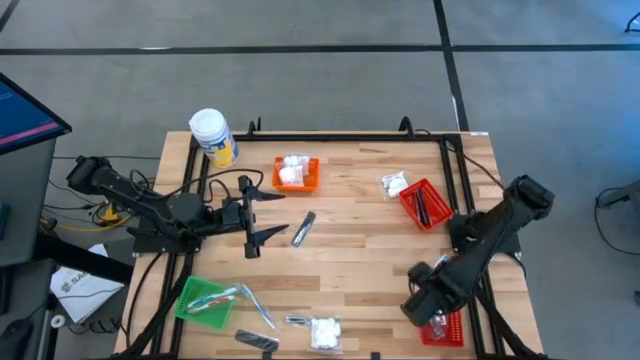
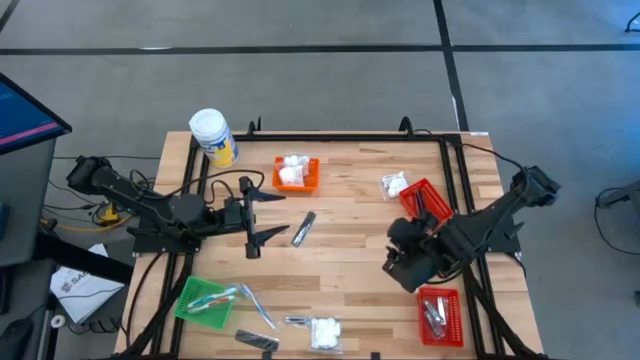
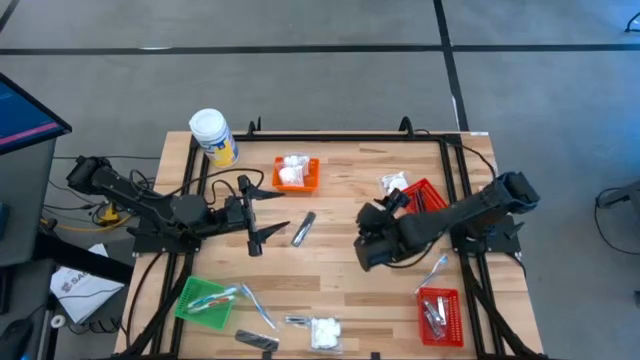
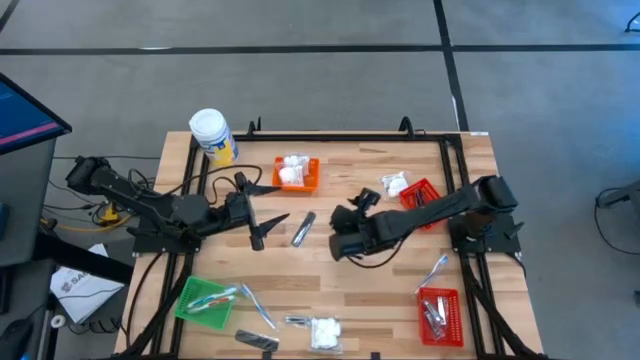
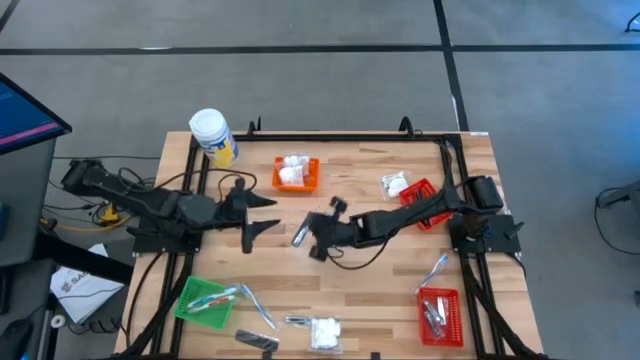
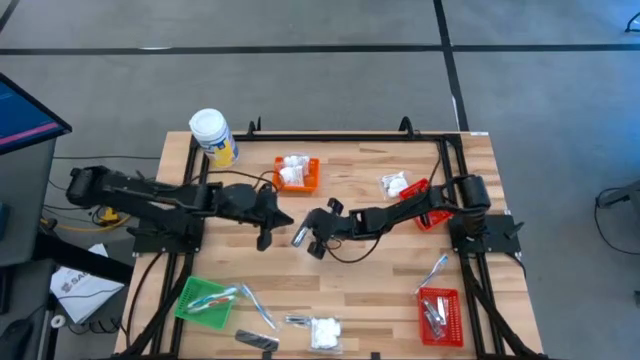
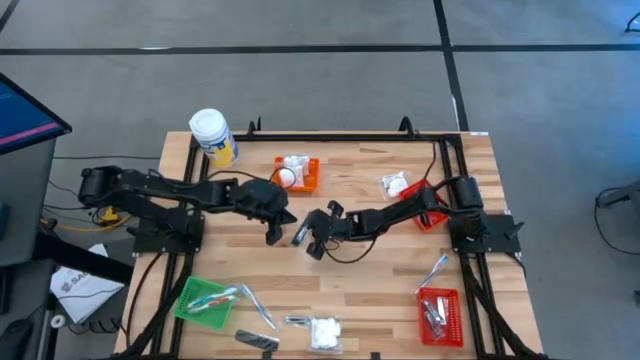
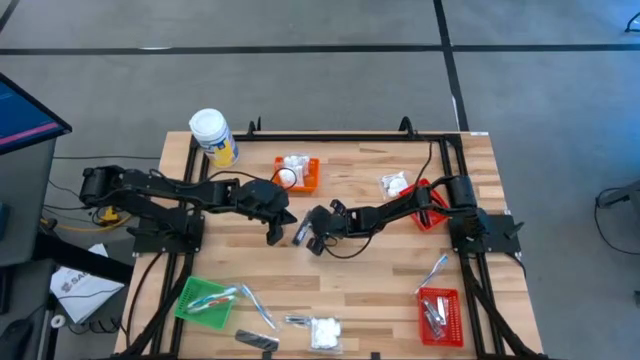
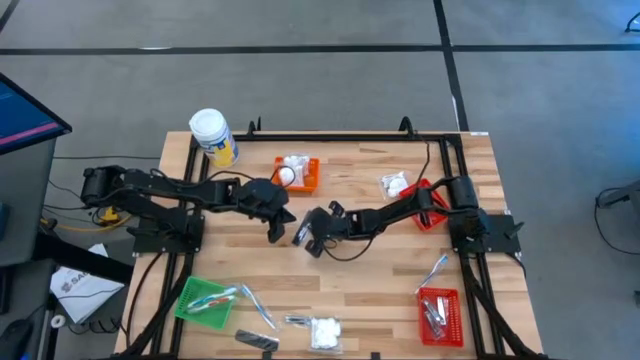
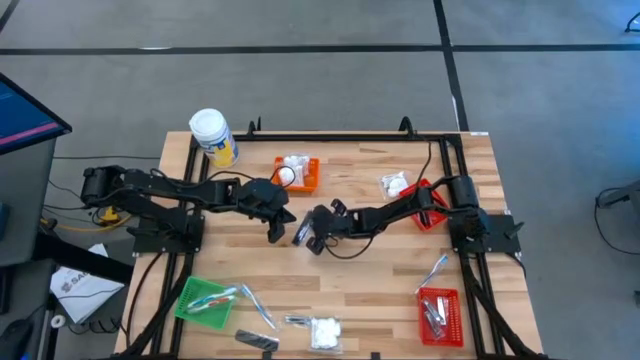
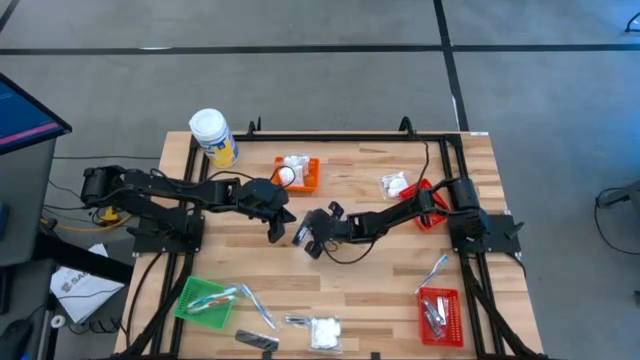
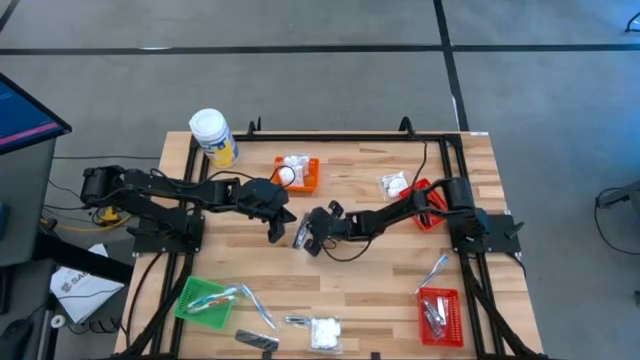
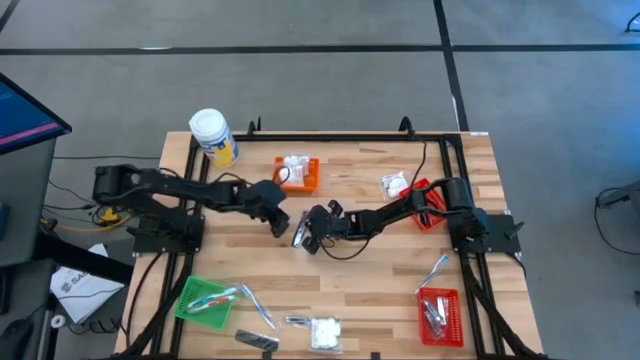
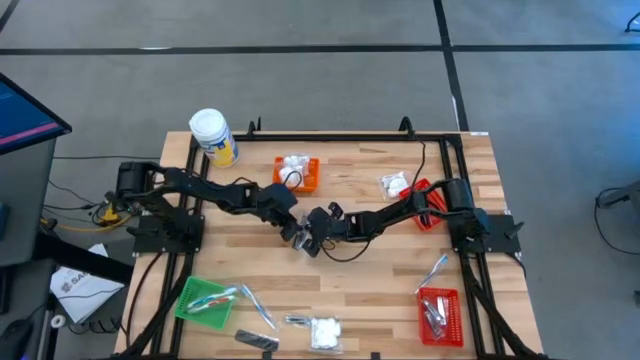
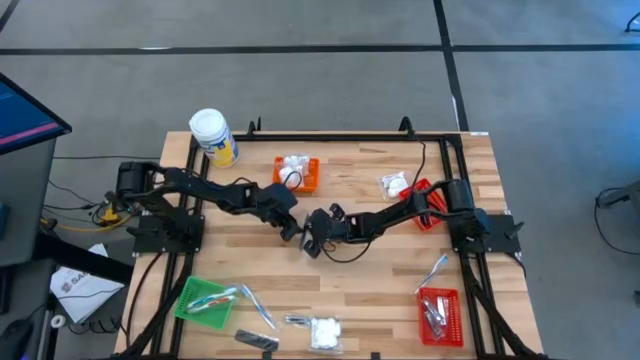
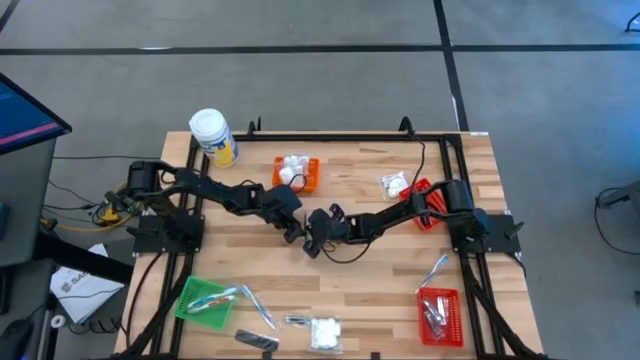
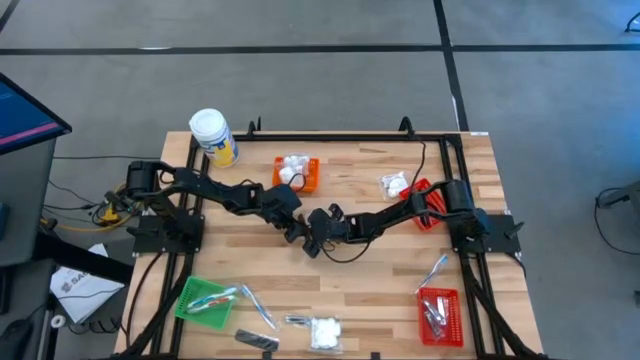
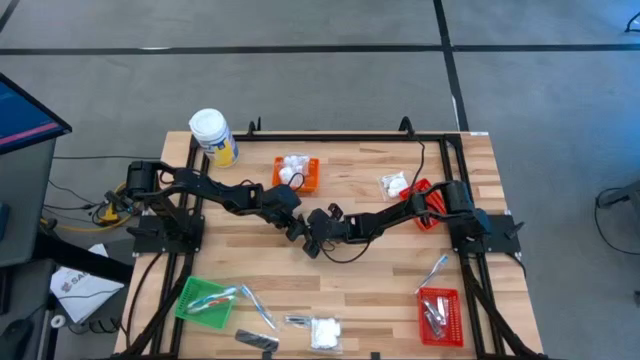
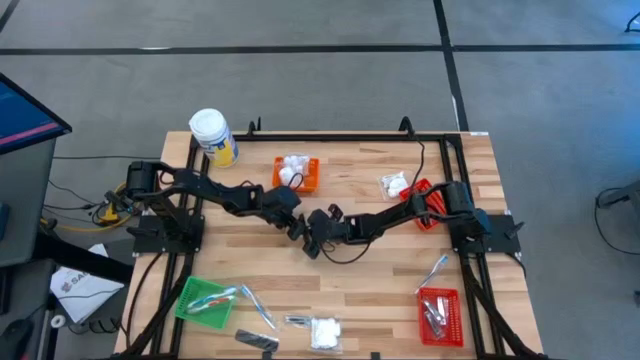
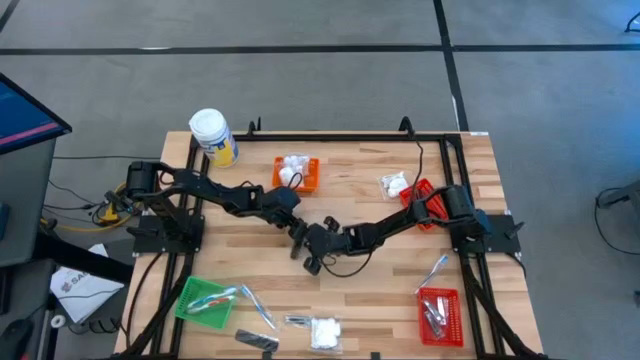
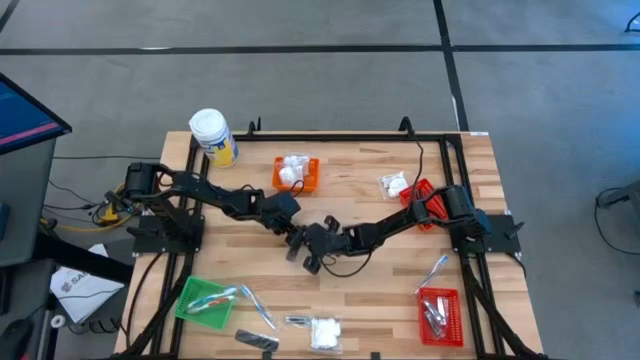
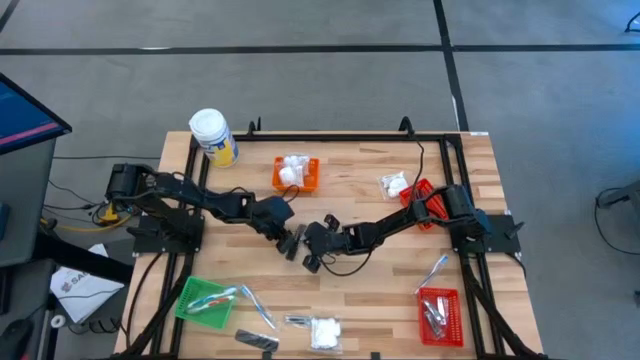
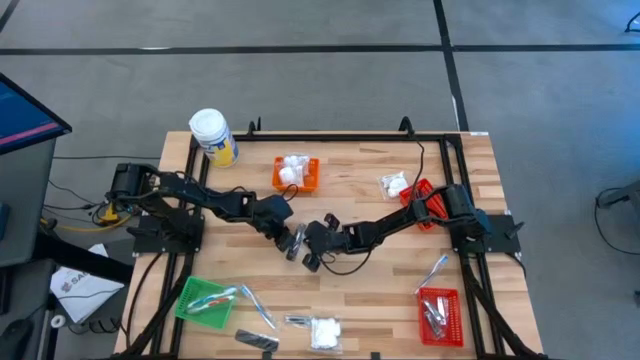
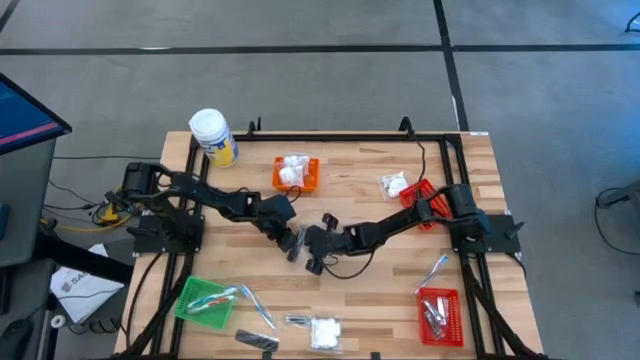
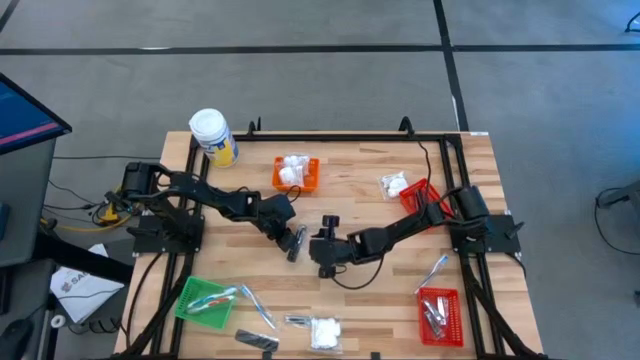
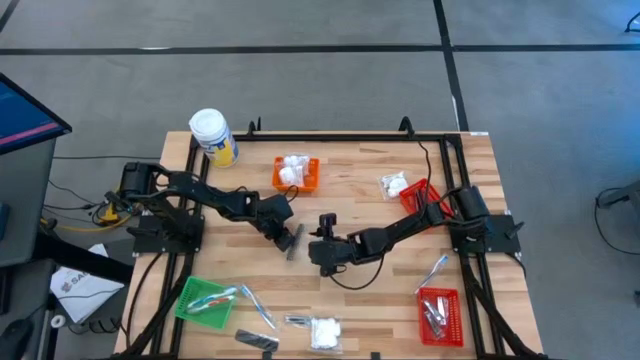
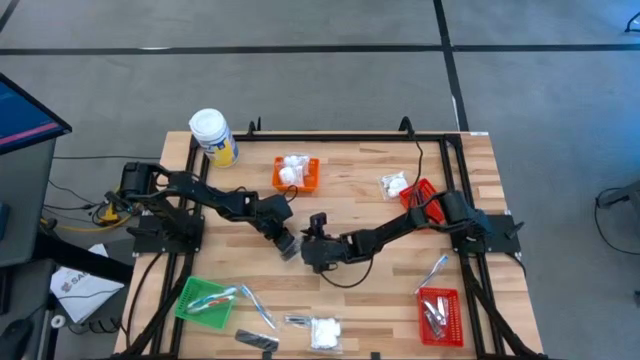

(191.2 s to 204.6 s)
Task: Pick & Place Travel size toiletries
Put the black comb into the top red basket

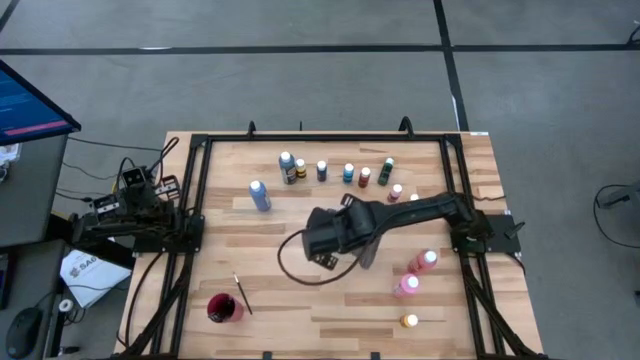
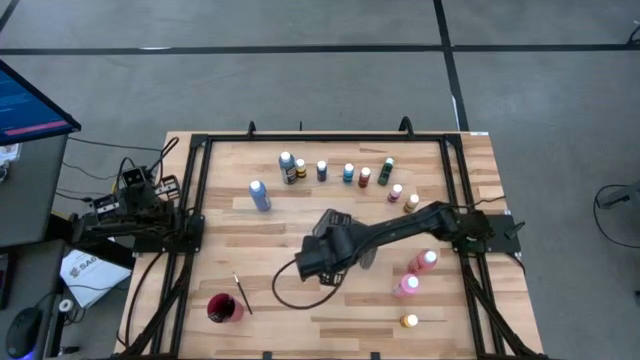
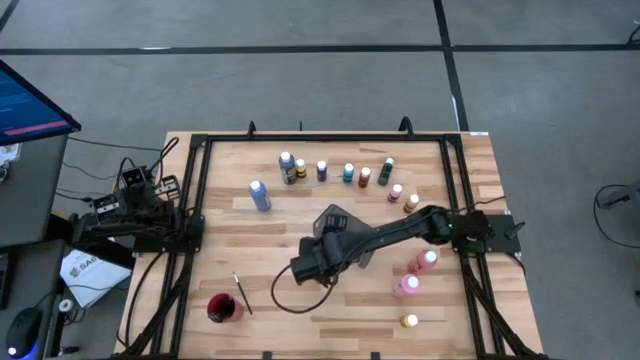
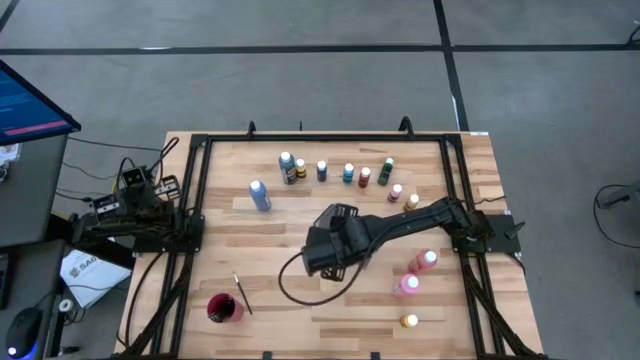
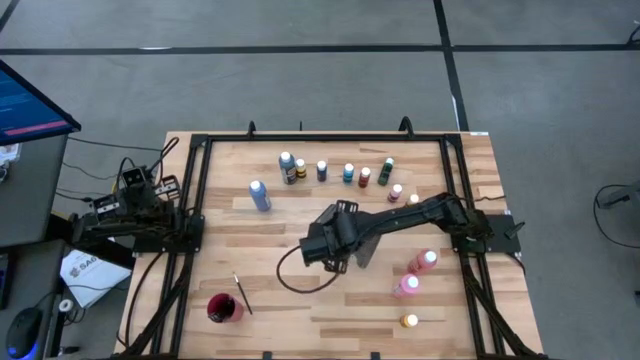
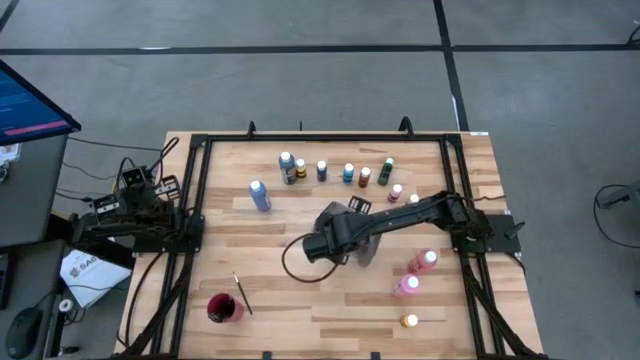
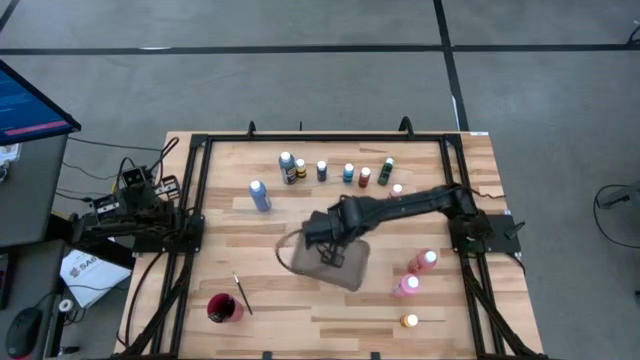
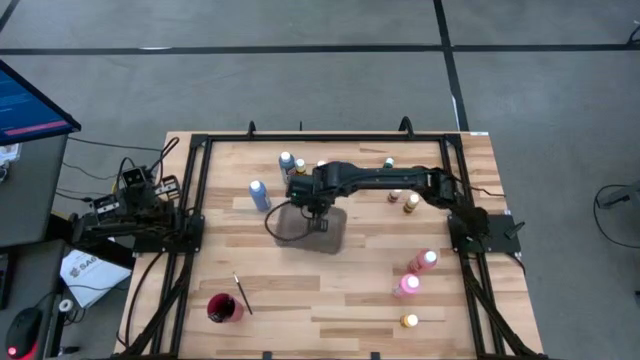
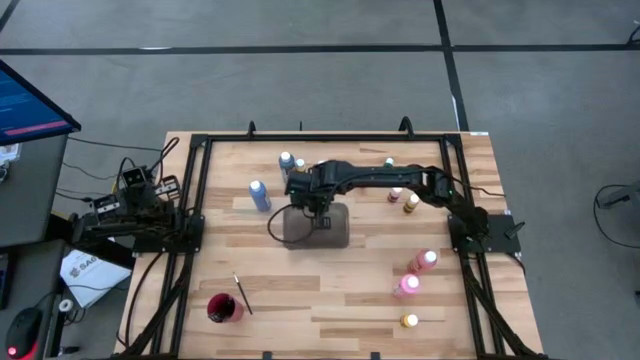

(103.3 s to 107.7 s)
Task: Pick & Place Paint Supplies
Adjust the black bin
